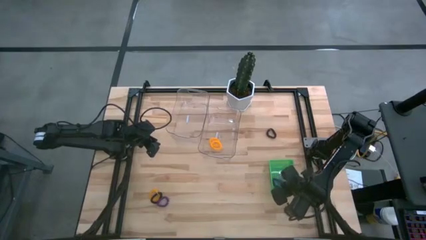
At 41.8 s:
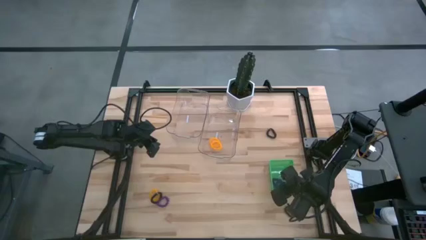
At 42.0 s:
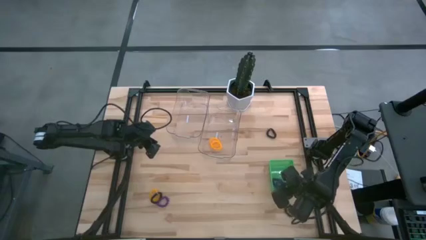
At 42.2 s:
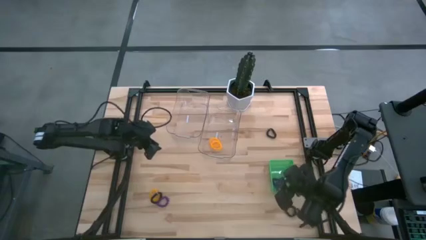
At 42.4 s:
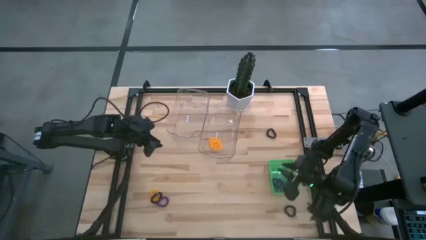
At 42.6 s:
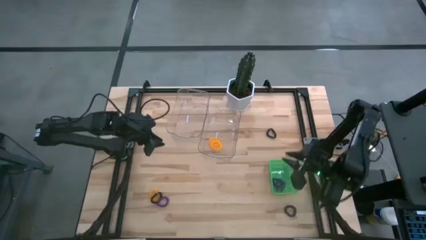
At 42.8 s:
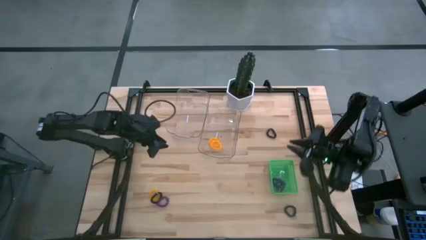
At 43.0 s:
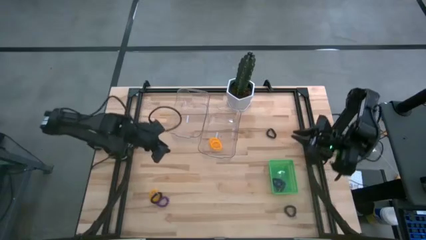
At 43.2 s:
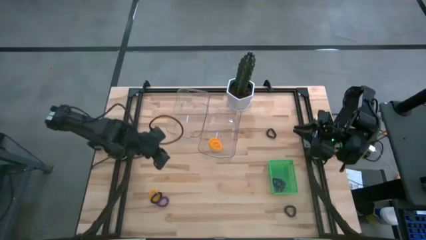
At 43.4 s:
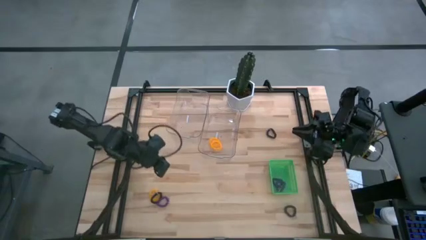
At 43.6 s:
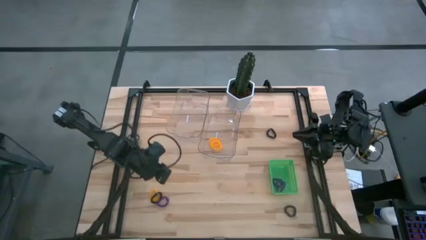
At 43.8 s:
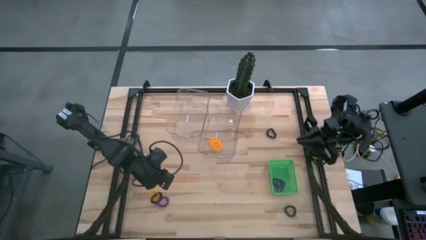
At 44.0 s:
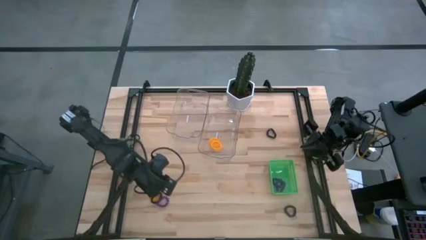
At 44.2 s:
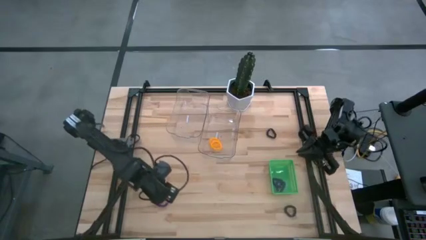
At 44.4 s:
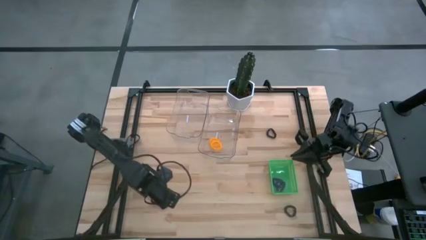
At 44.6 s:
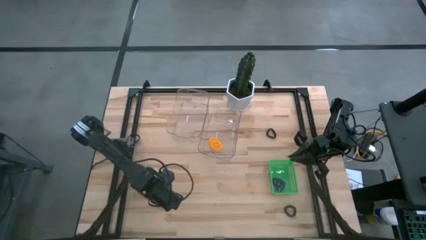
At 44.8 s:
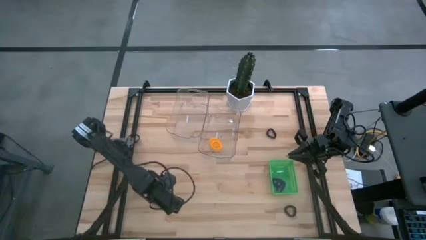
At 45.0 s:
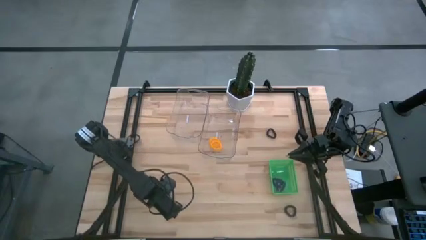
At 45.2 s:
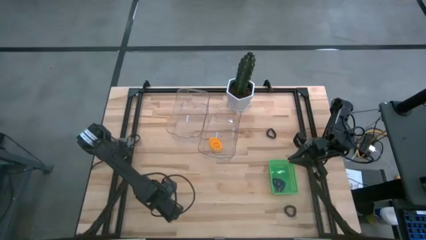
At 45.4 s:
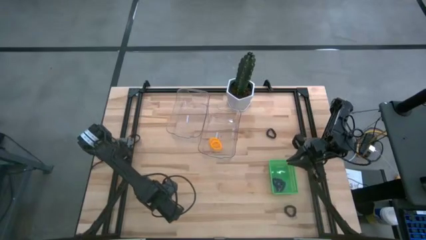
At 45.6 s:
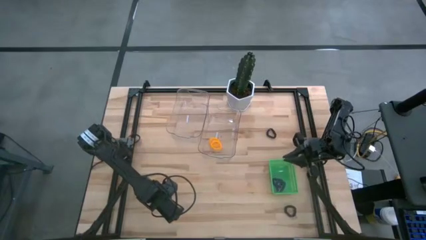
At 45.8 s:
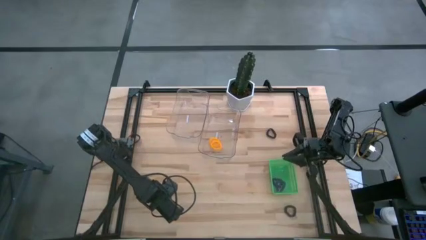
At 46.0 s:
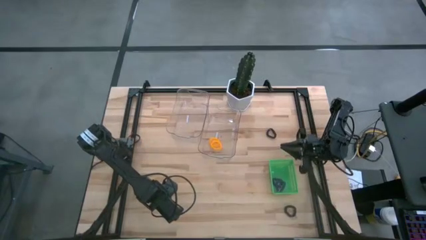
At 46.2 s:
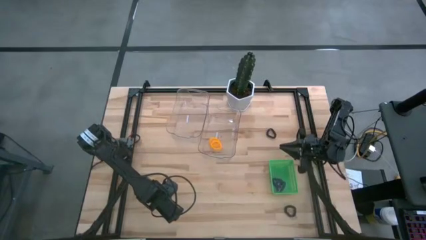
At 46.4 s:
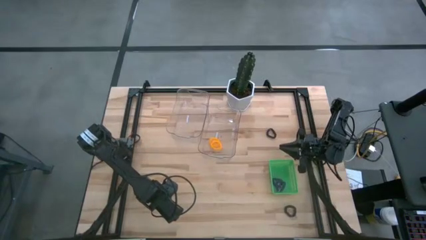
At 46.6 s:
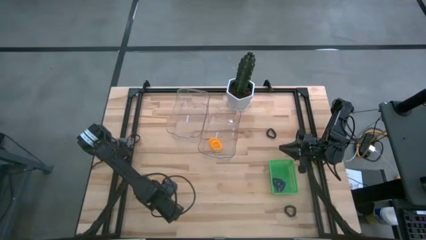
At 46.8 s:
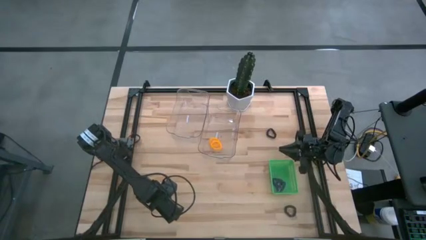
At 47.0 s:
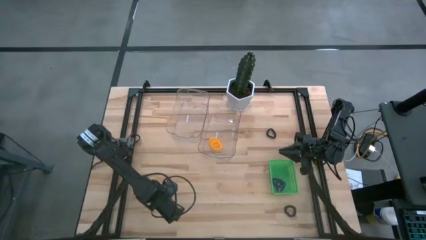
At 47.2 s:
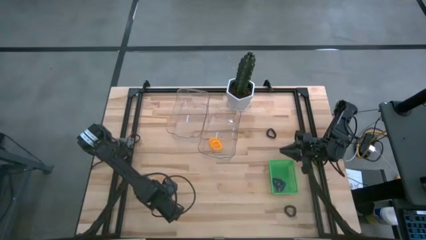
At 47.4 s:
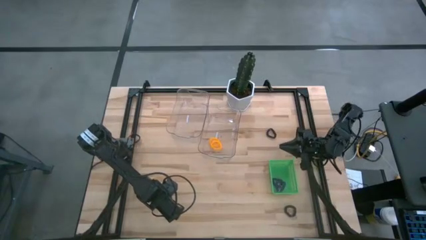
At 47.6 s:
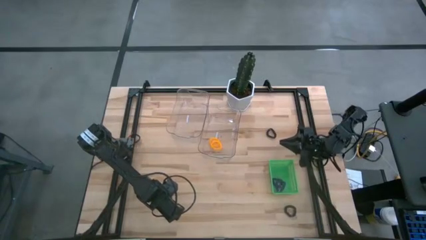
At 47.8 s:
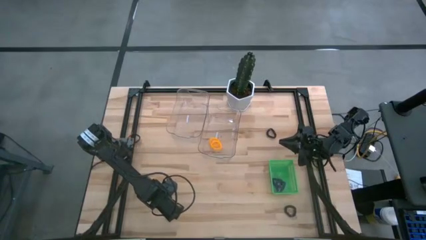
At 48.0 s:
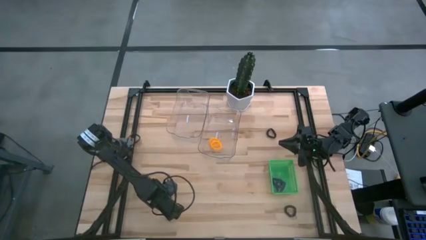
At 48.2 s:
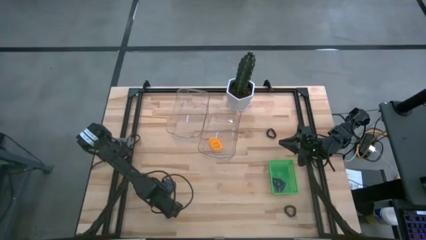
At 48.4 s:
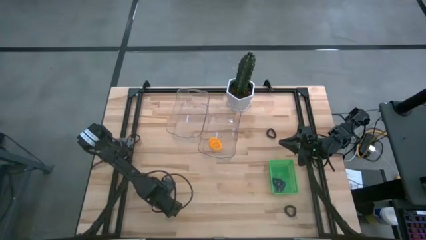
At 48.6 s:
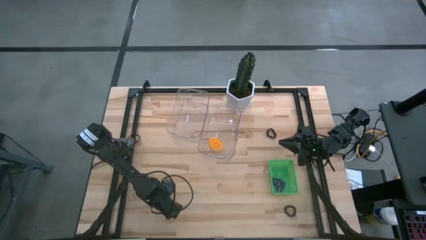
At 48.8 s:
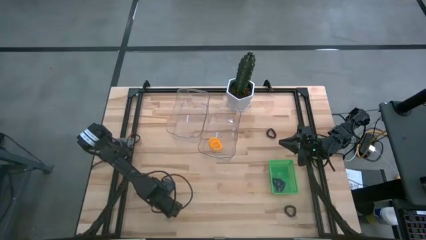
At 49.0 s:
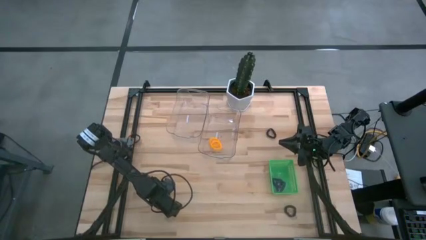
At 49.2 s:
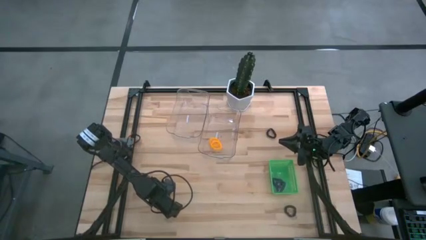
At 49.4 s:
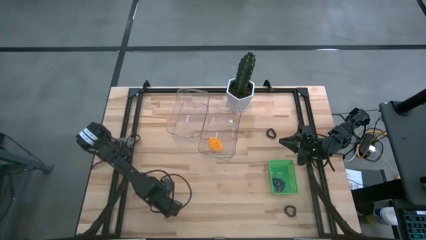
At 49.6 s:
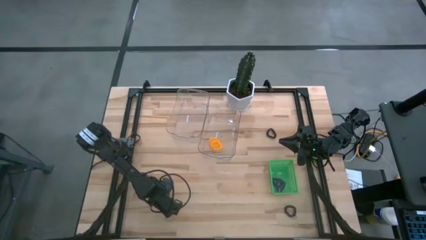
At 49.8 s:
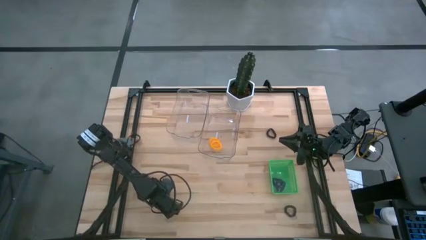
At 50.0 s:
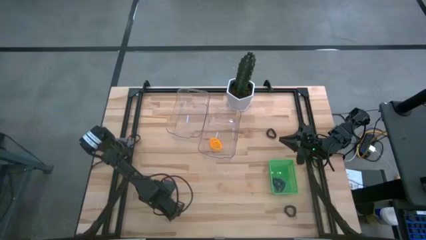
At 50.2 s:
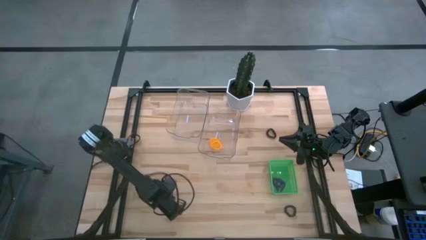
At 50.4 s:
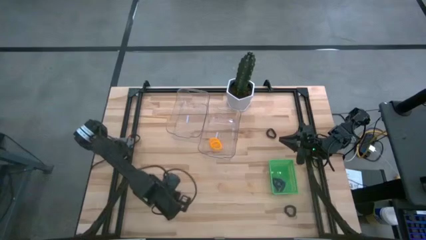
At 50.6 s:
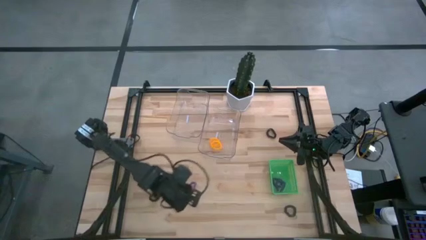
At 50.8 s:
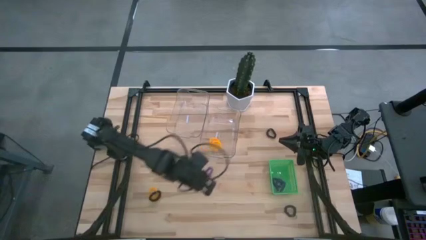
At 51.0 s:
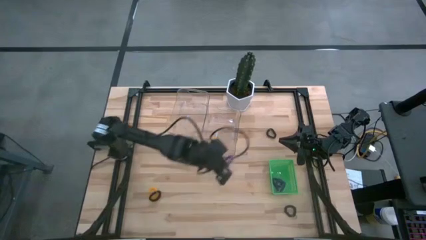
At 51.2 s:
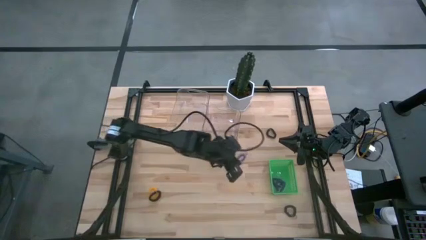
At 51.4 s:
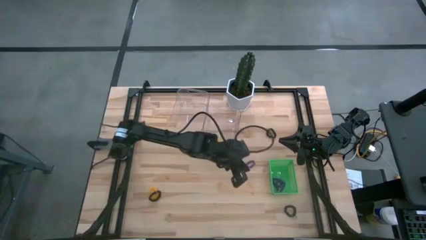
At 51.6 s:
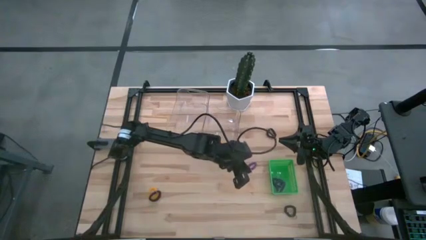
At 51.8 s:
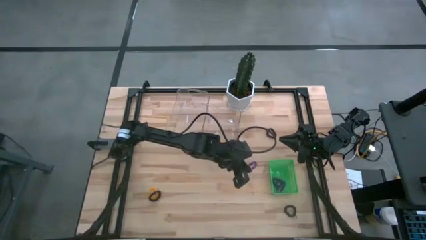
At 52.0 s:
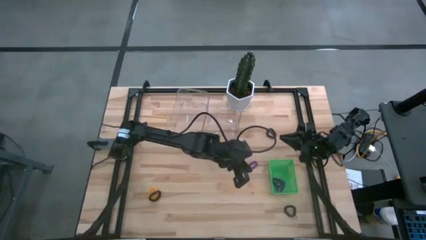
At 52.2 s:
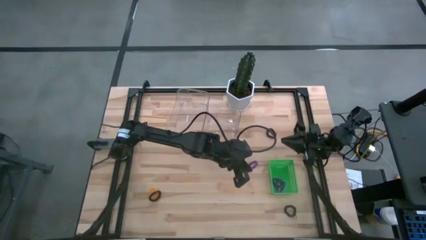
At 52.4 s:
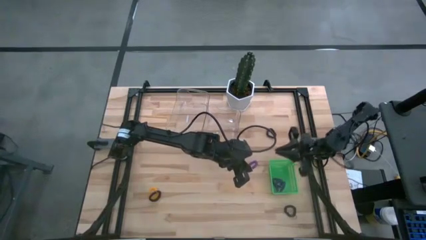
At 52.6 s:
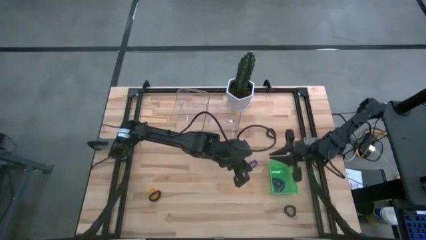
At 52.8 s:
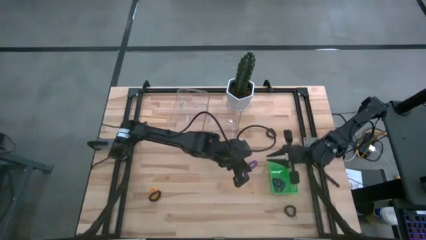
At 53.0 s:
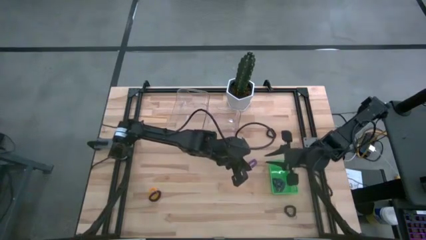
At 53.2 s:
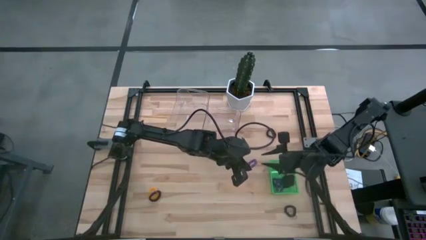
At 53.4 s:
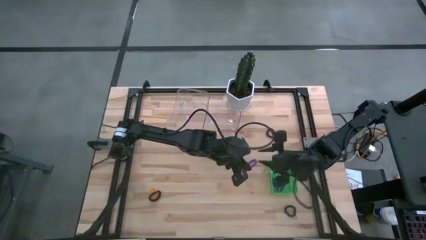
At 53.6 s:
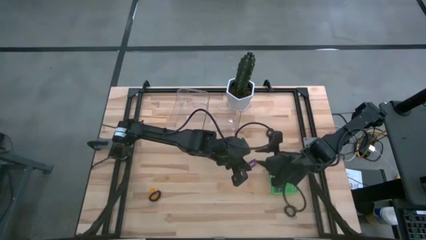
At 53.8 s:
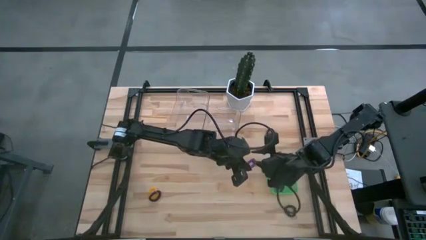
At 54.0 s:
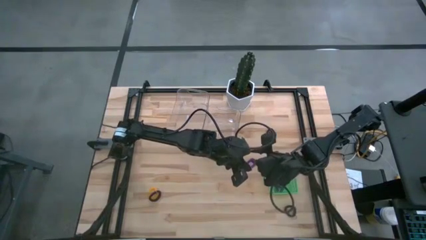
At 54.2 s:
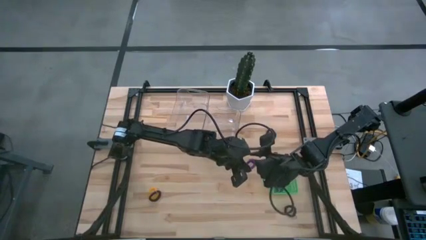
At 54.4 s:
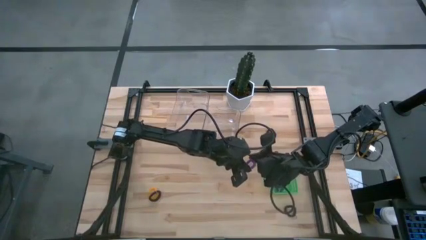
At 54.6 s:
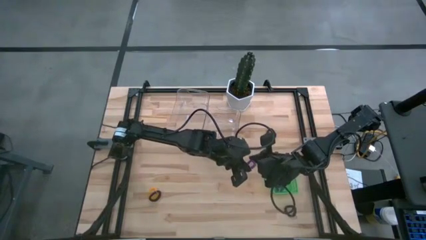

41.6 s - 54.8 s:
Task: Sort spring keychains
Put the violet spring keychain into the green bin
